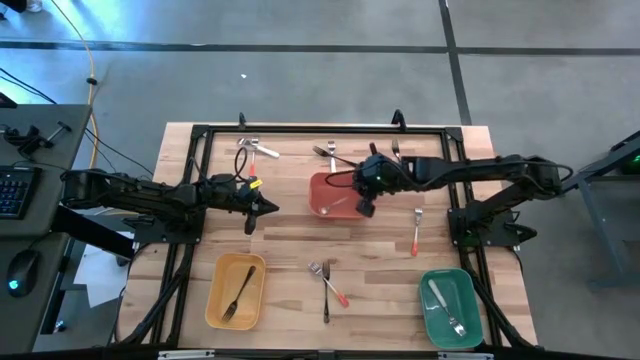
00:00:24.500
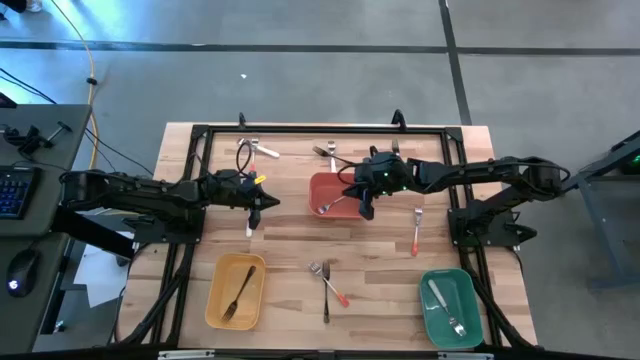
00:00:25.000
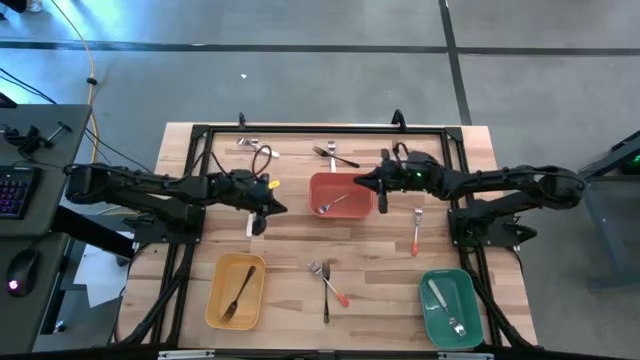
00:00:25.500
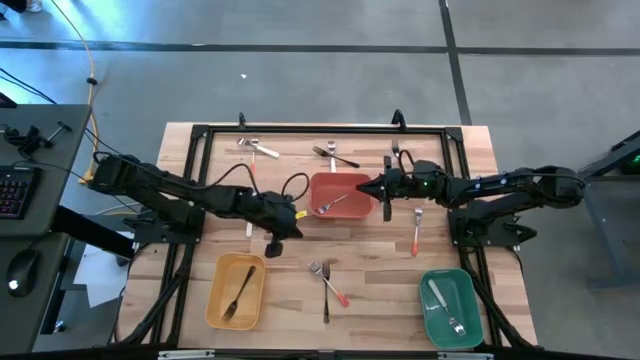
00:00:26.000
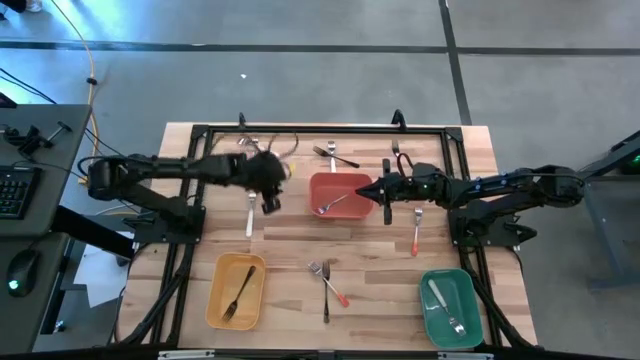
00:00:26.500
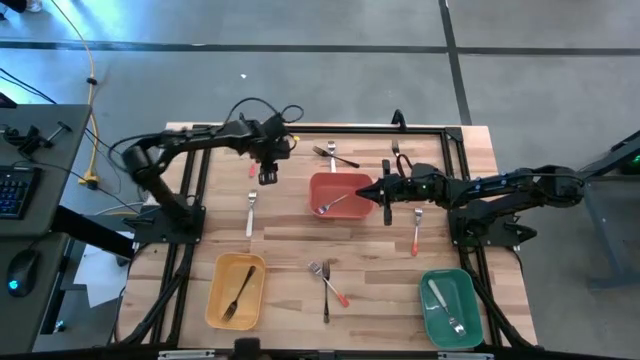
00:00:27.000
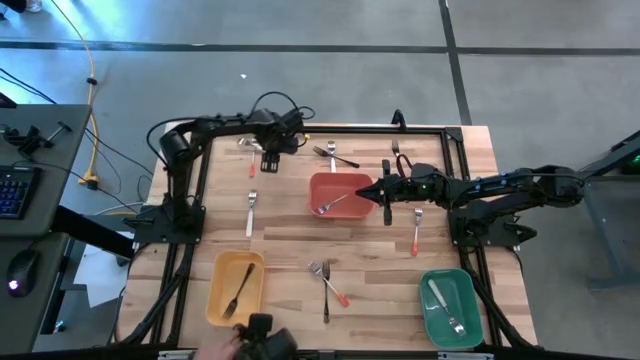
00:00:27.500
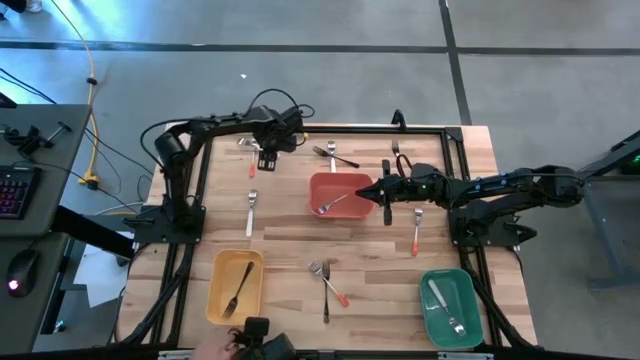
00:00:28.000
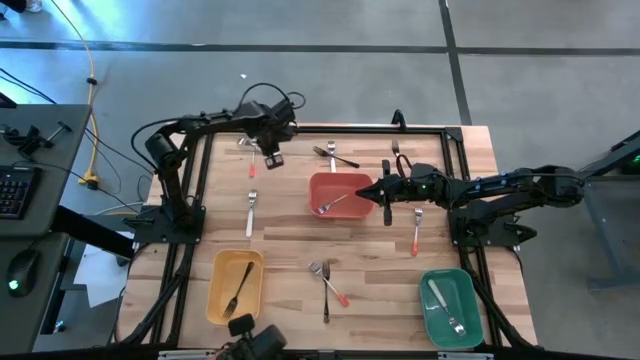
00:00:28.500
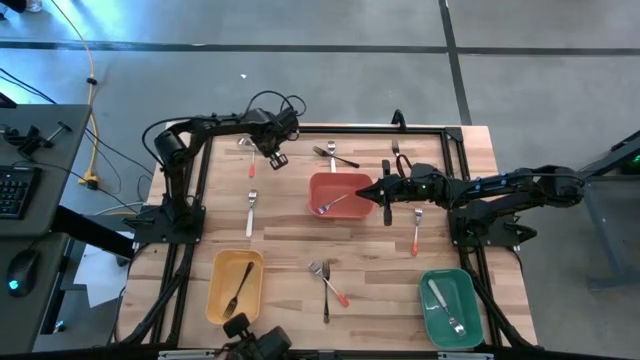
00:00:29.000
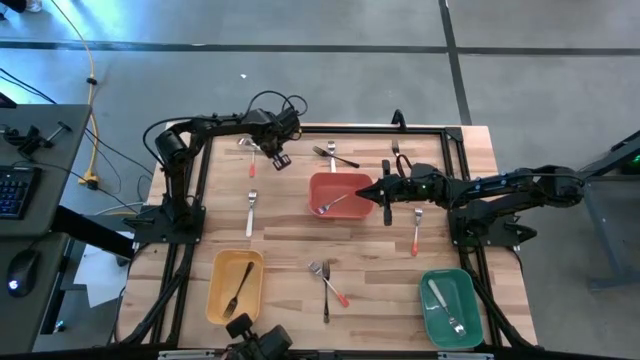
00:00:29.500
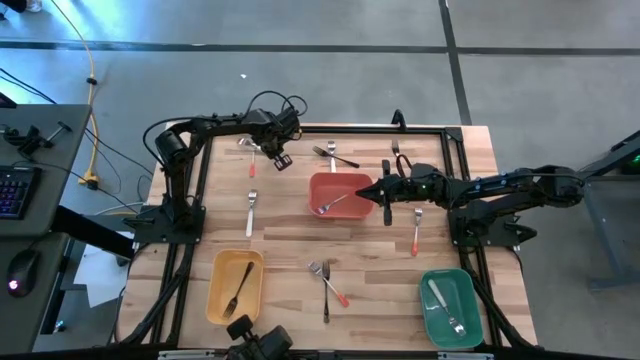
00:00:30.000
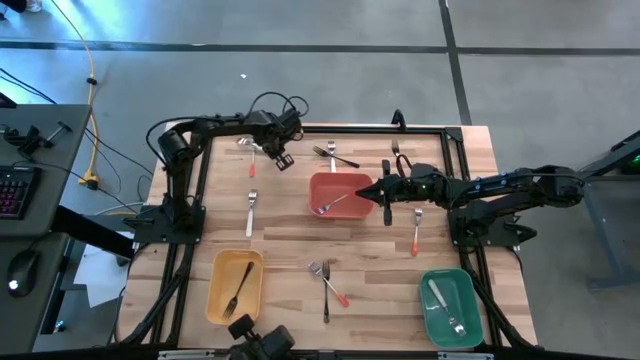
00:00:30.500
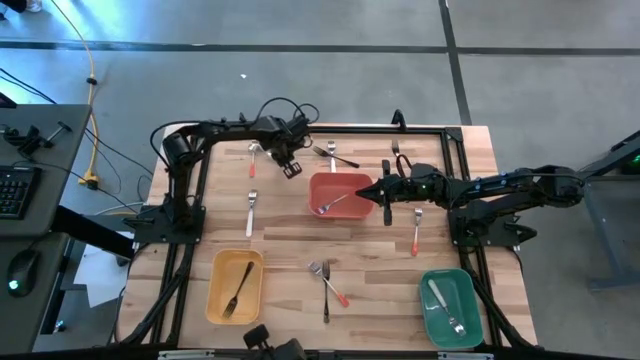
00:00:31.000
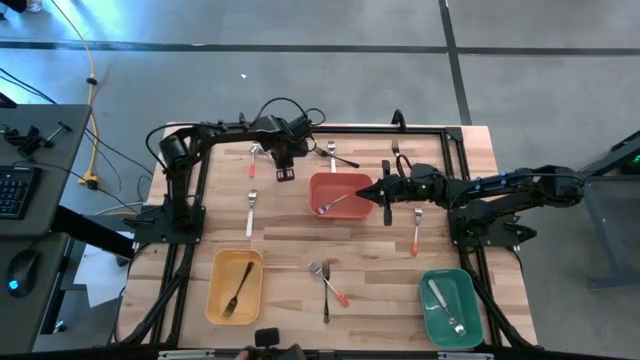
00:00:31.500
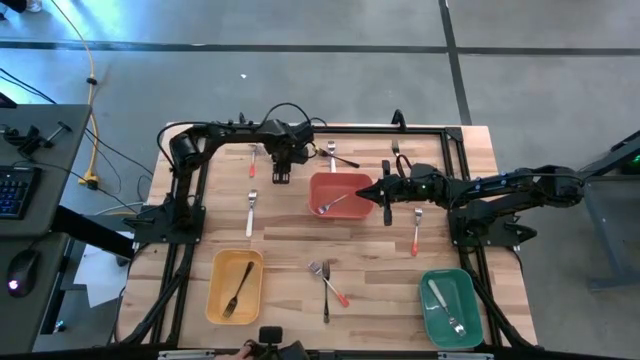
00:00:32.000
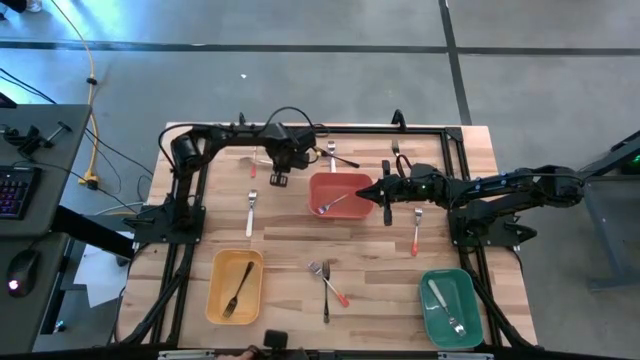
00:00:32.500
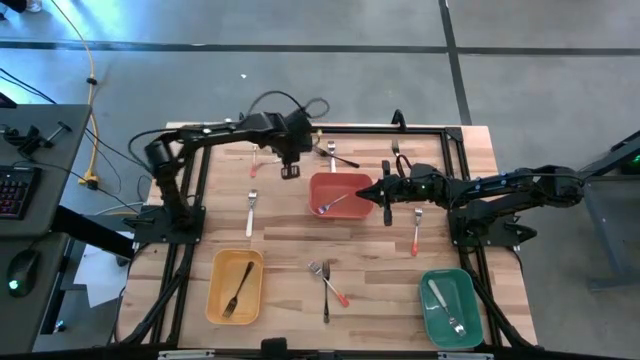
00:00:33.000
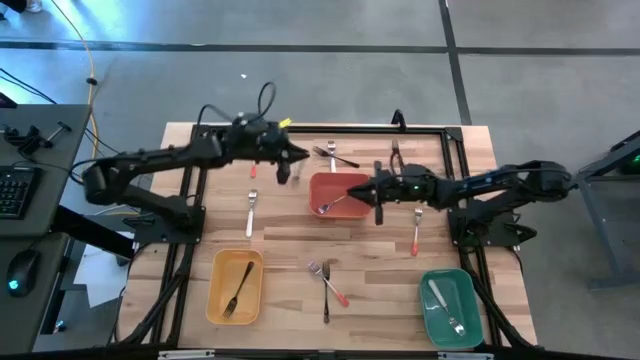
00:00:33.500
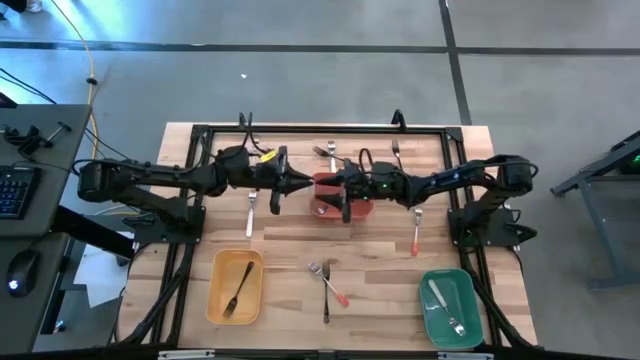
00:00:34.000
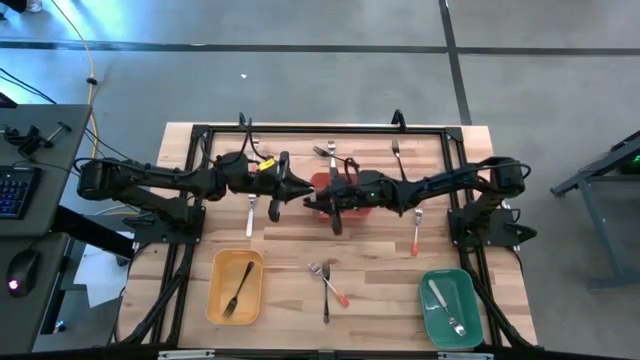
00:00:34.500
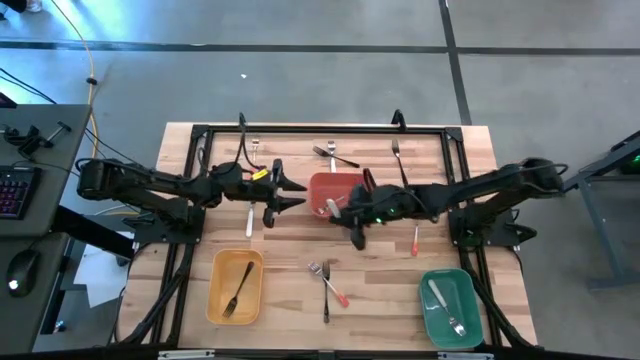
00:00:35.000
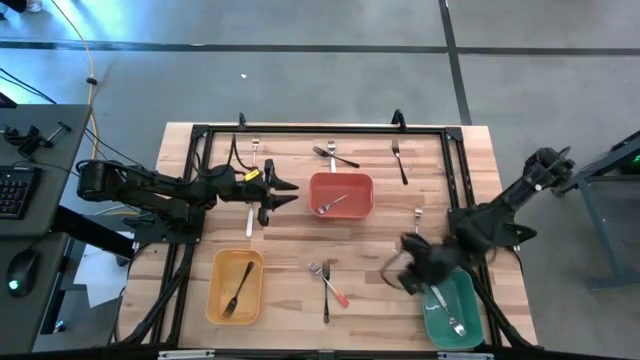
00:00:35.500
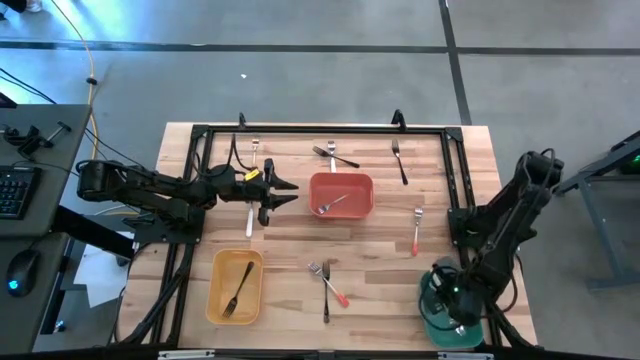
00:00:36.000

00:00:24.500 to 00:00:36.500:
Task: Sort silverware by color (type)
Put the top left white fork into the green bin

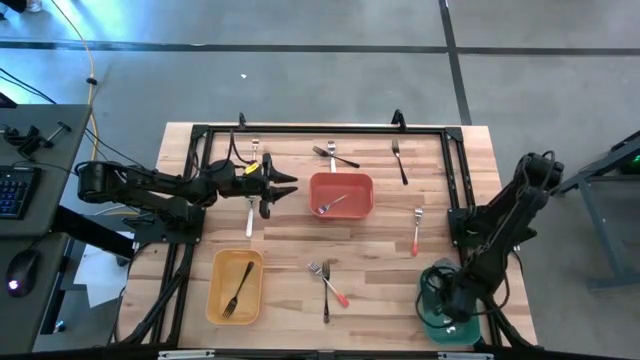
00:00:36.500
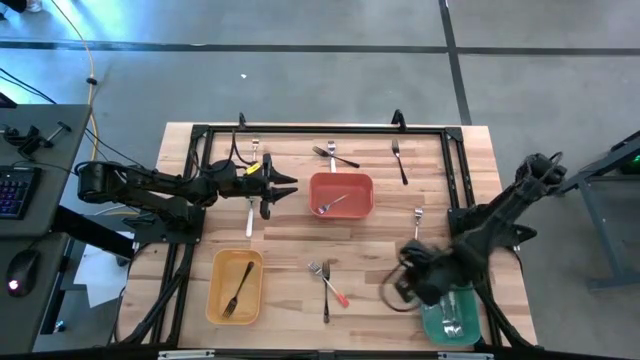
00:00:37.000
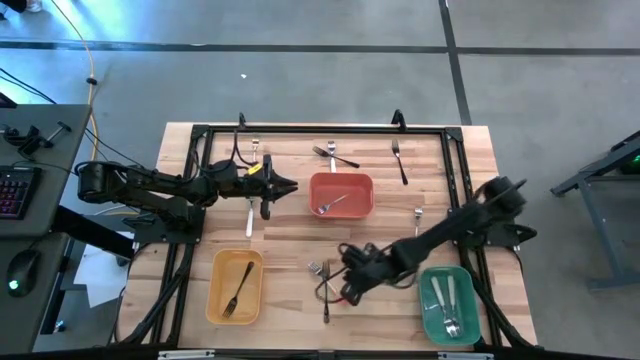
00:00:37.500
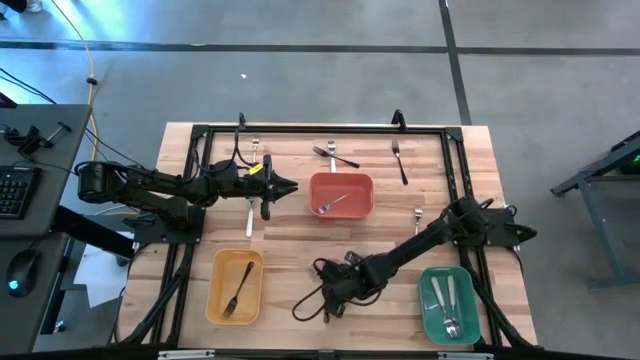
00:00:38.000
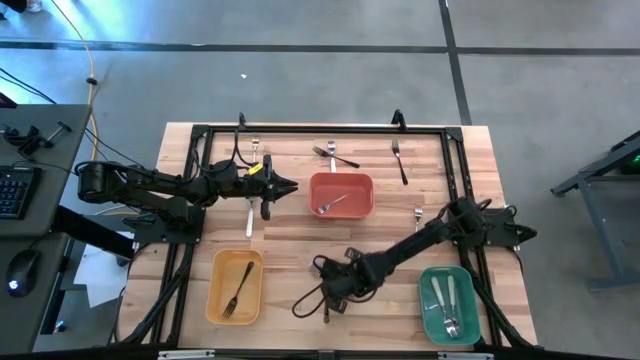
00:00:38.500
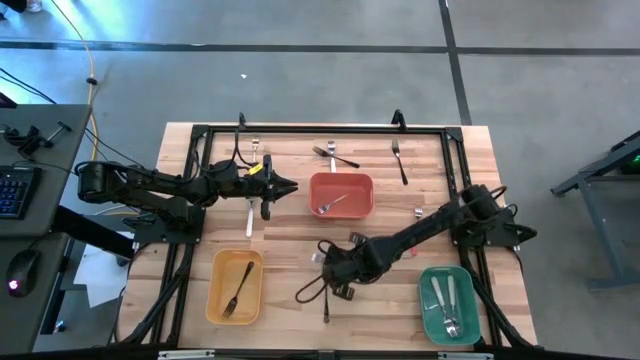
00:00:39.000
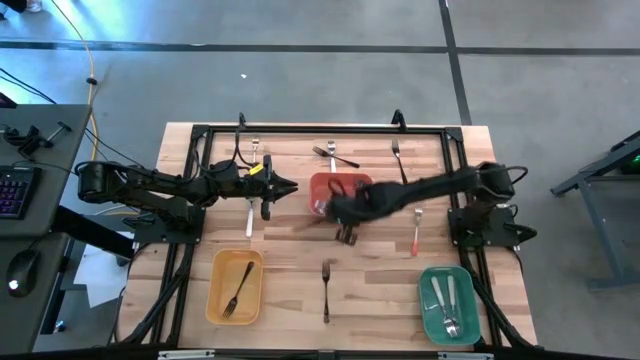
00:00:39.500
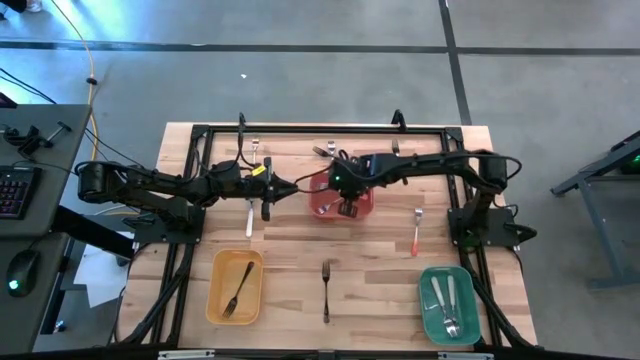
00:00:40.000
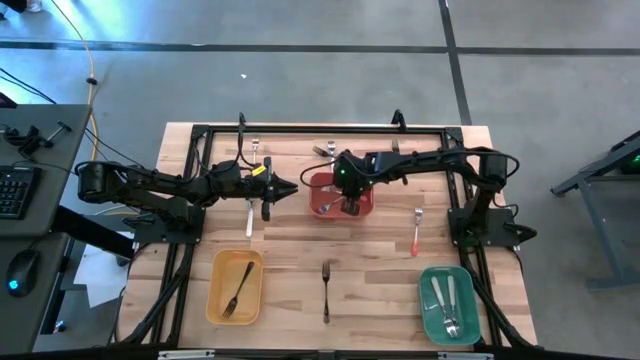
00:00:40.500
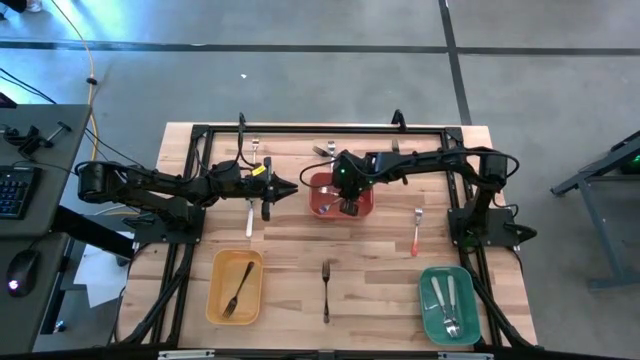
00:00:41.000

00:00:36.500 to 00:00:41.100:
Put the bottom orange fork into the orange bin

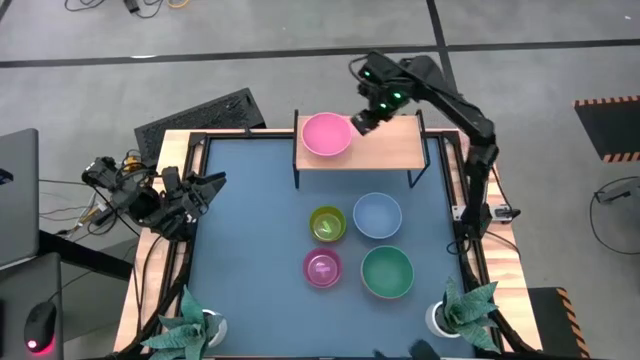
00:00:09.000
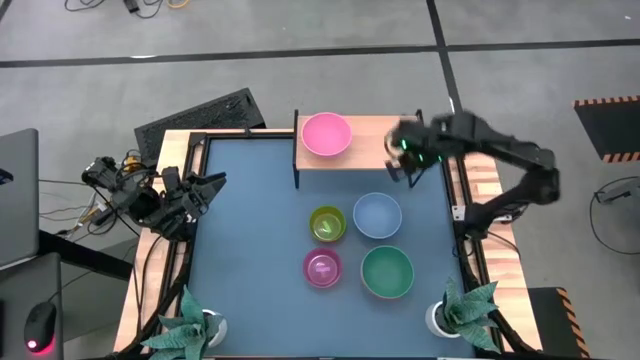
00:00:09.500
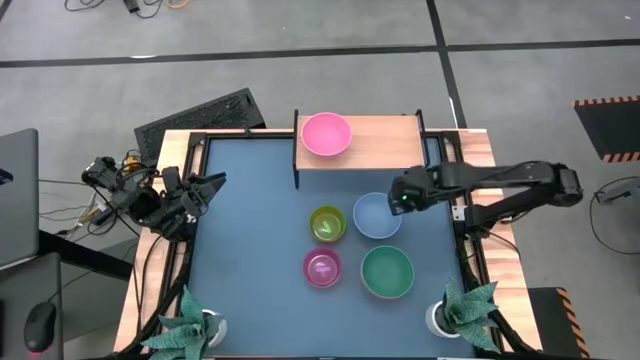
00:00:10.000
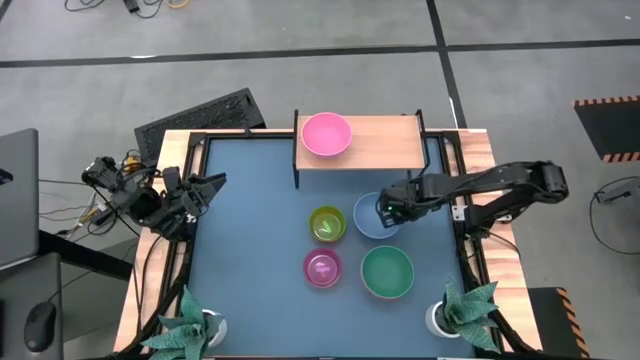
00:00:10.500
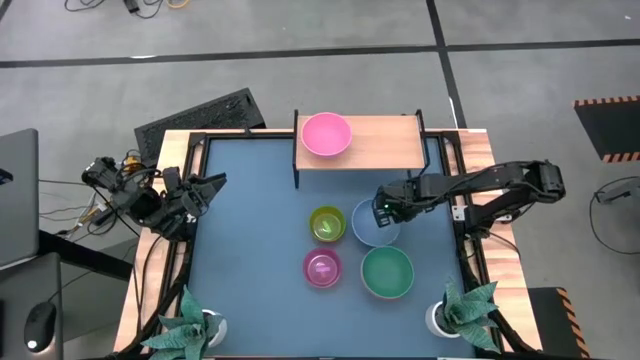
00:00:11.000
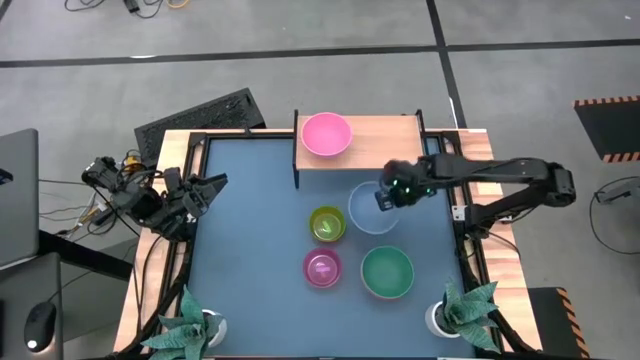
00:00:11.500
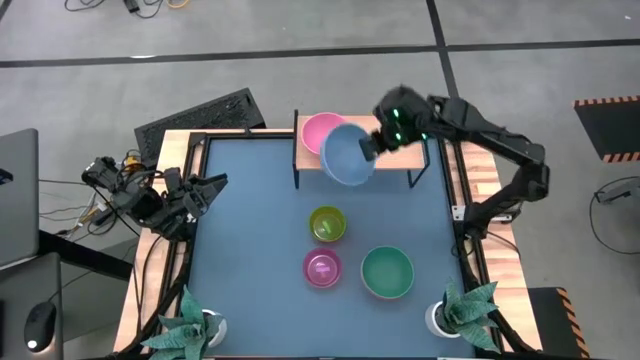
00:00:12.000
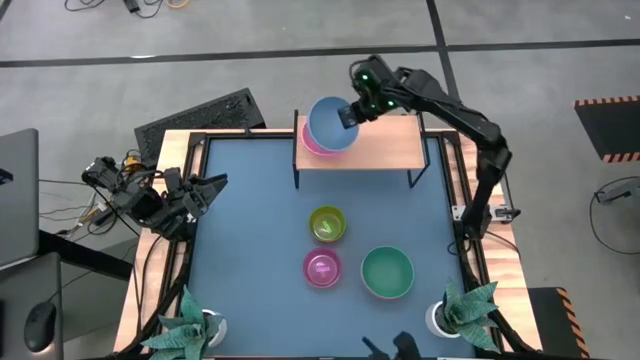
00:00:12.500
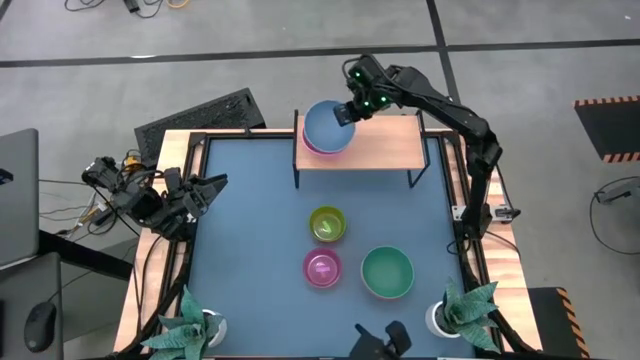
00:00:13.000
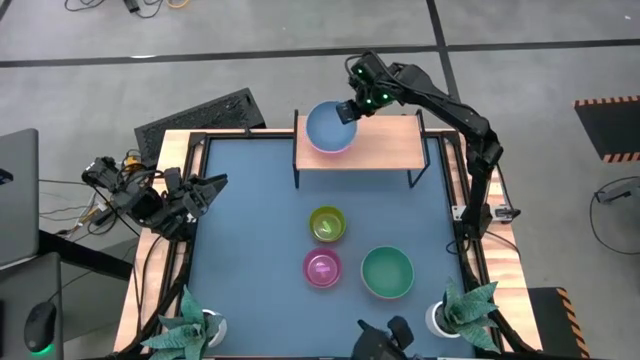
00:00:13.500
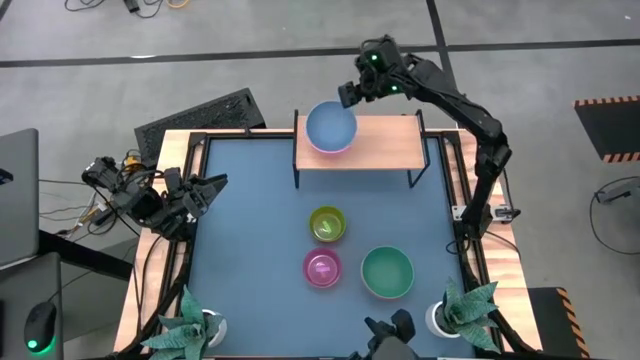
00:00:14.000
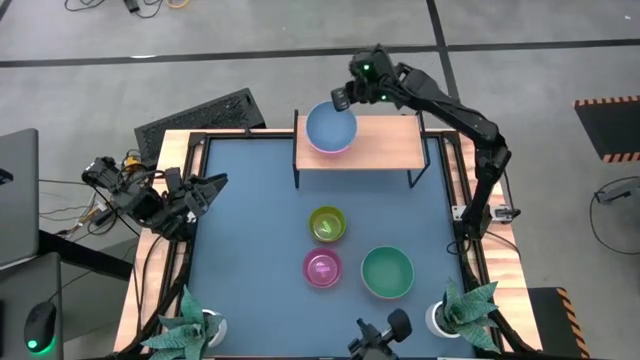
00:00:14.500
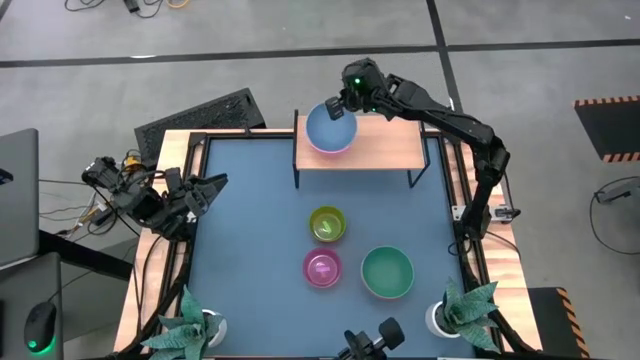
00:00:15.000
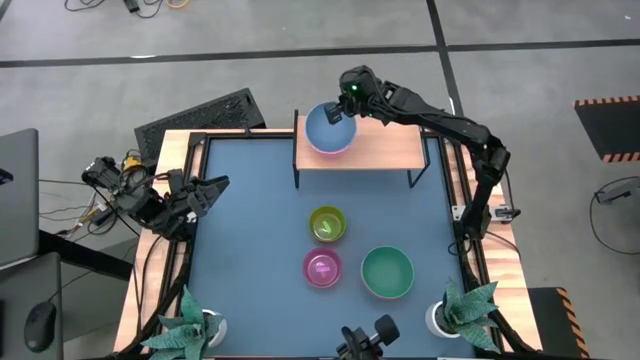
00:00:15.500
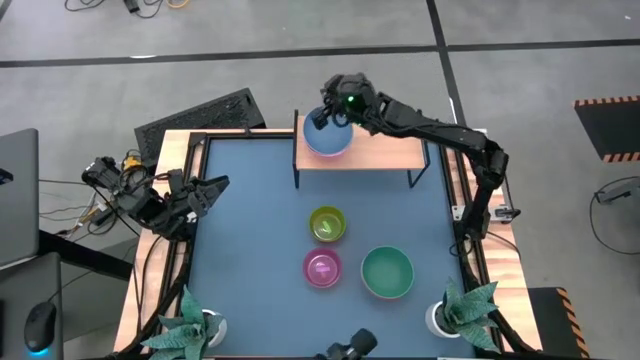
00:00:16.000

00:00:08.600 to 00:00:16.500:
Task: Place and stack bowls onto a shelf
Stack the large blue bowl on the large pink bowl on the shelf
